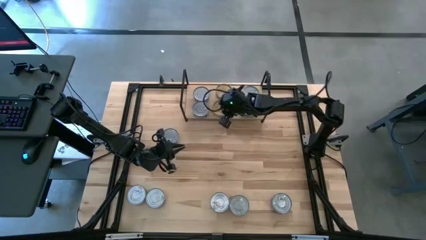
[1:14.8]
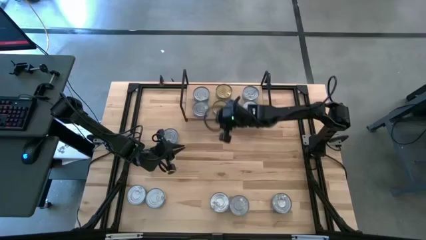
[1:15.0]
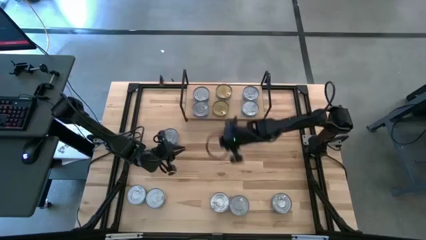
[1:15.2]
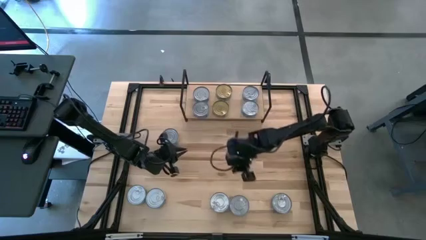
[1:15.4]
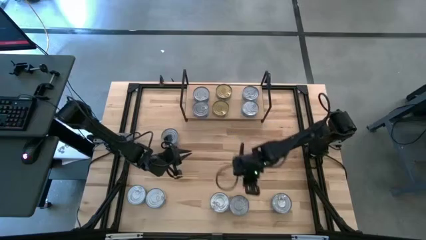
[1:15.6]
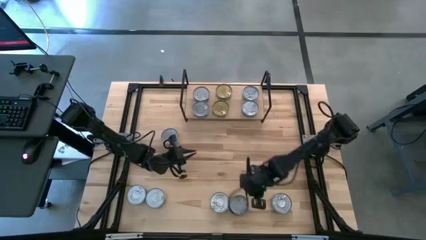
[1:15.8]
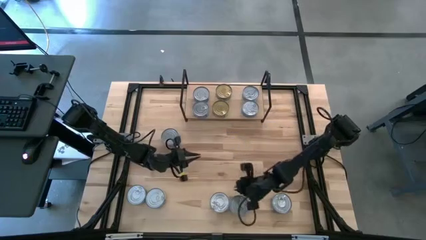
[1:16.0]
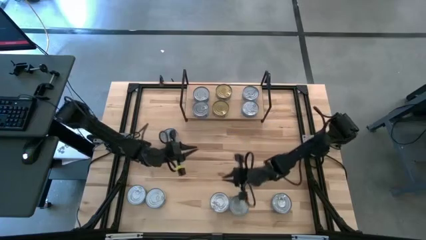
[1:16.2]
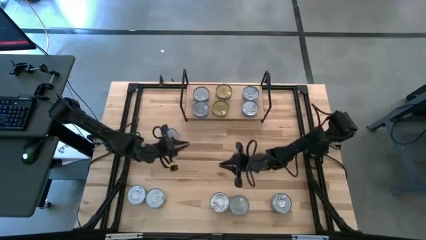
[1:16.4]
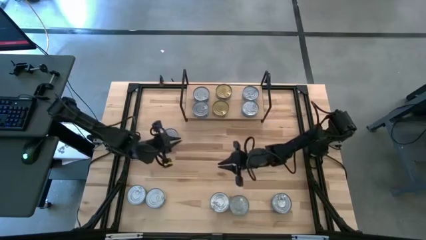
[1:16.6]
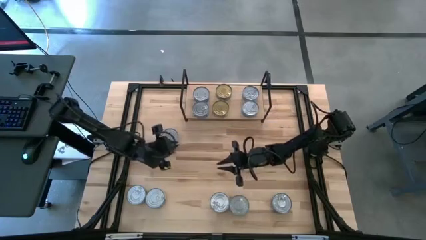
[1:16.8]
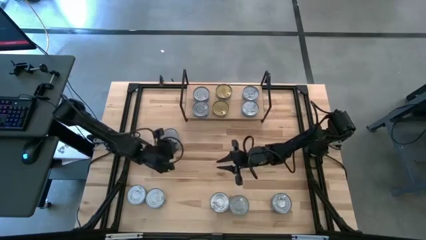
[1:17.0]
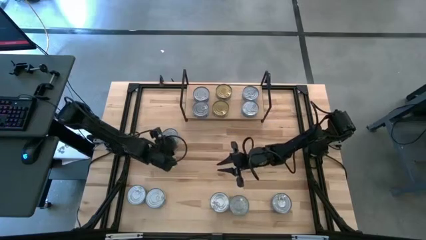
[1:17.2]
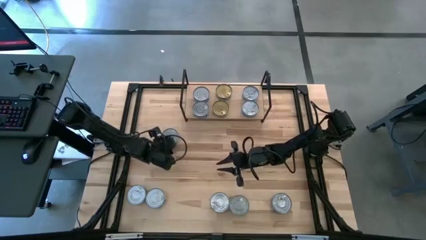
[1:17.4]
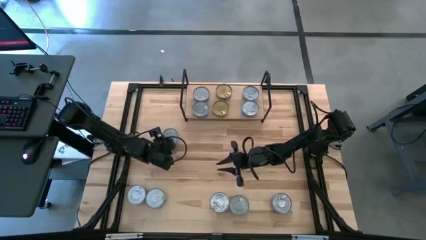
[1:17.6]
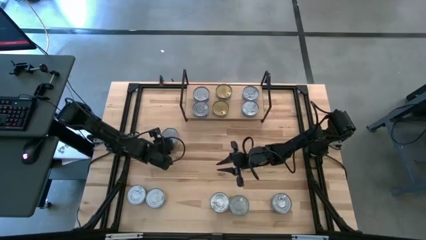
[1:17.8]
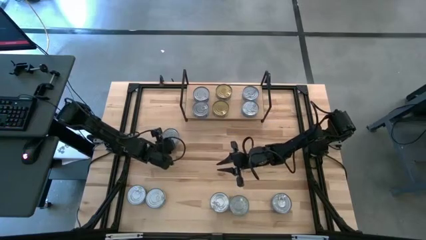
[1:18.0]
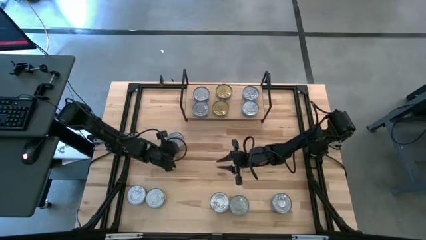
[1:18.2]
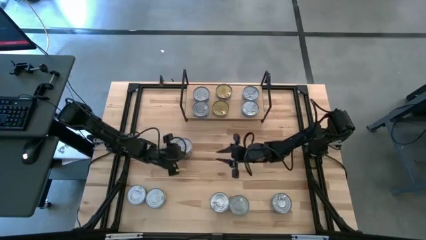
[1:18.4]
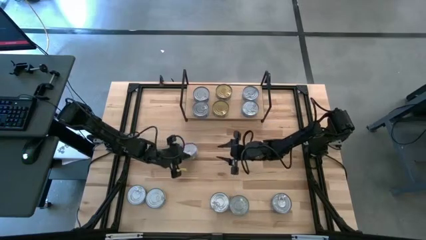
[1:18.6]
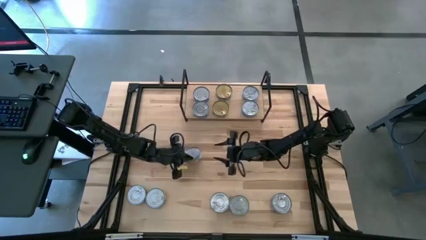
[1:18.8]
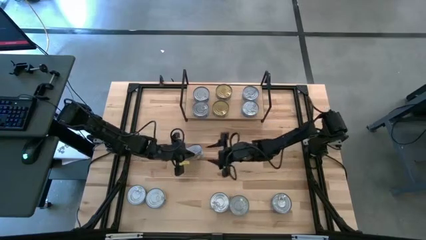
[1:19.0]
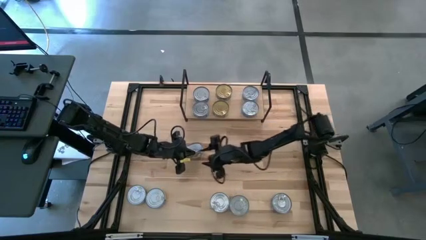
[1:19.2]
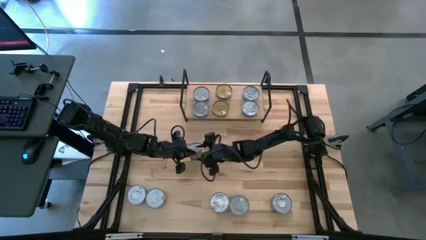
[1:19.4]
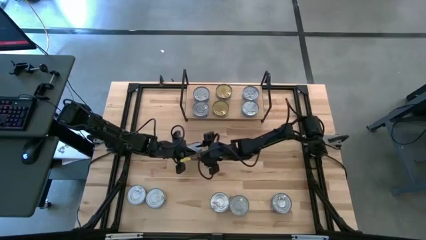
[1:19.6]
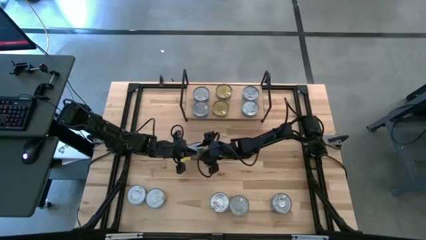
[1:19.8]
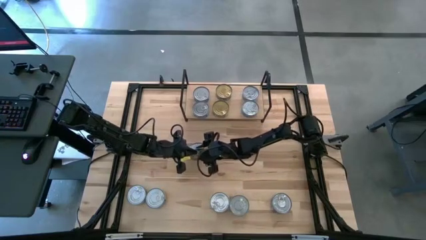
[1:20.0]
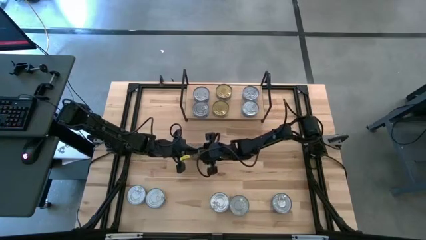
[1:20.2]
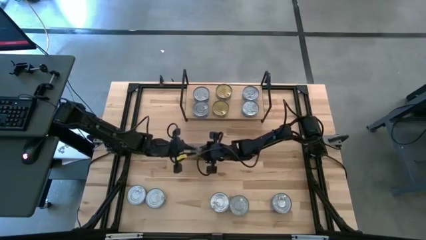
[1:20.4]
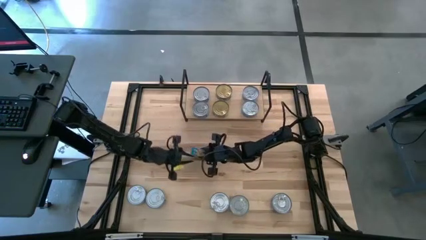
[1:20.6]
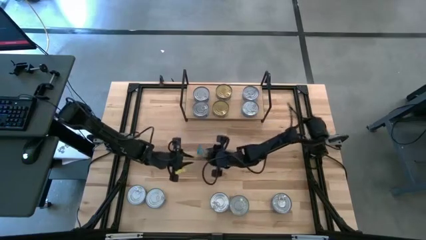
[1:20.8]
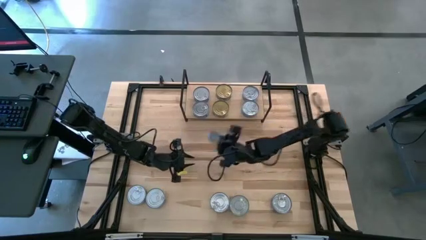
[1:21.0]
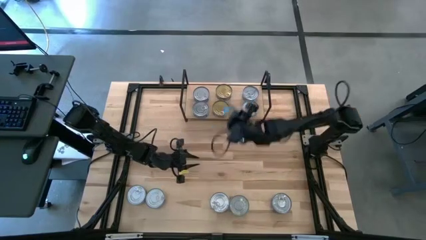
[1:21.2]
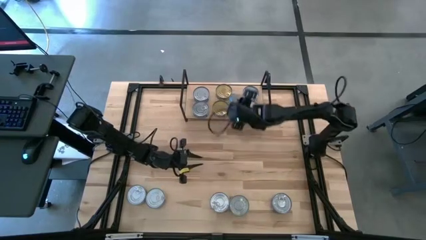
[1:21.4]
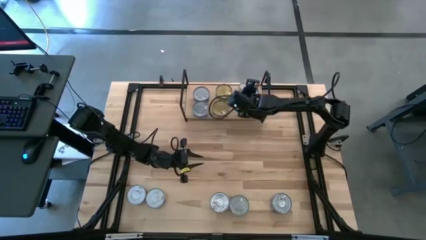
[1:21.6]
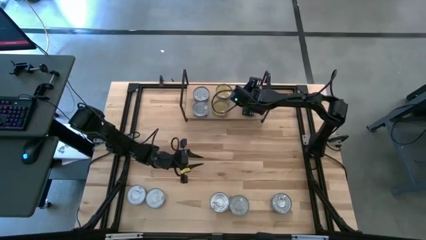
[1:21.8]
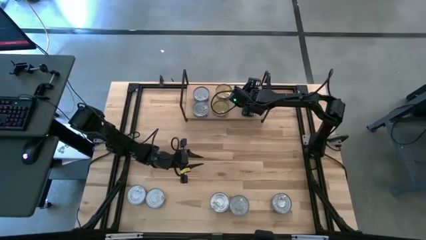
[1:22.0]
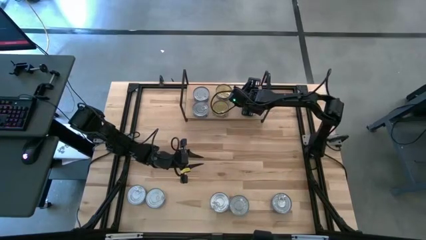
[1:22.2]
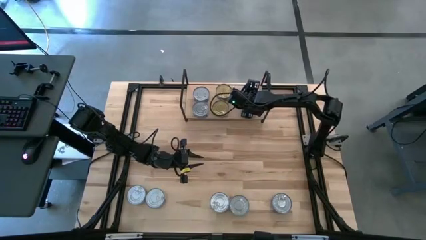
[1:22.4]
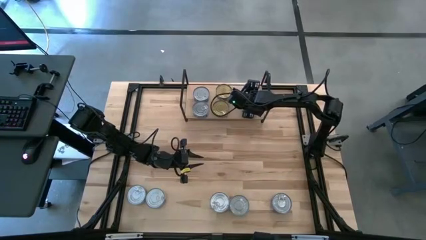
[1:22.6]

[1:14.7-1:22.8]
Task: Stack canned seafood by type on shelf
Stack the top yellow-blue tuna can on top of the top yellow-blue tuna can on the shelf

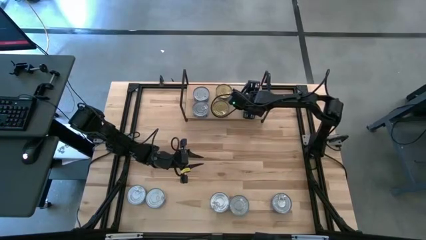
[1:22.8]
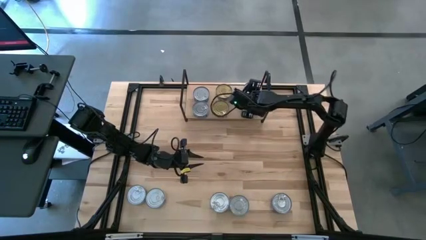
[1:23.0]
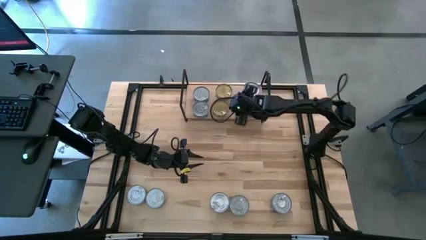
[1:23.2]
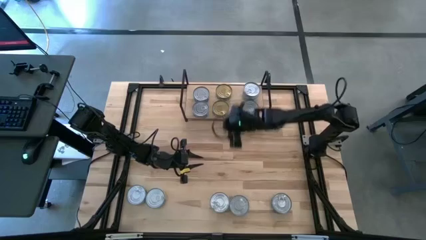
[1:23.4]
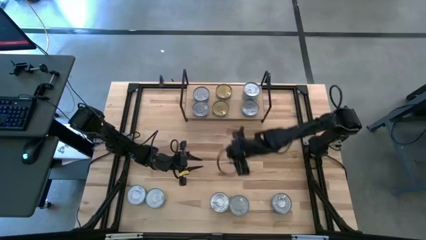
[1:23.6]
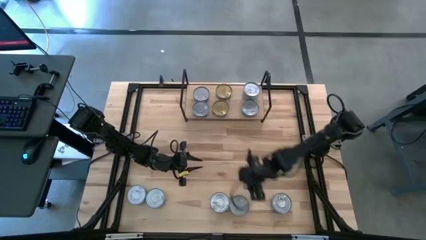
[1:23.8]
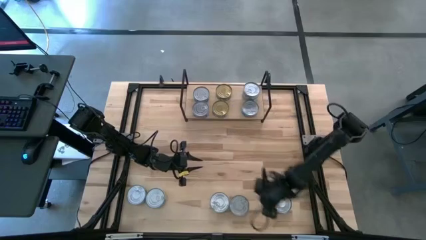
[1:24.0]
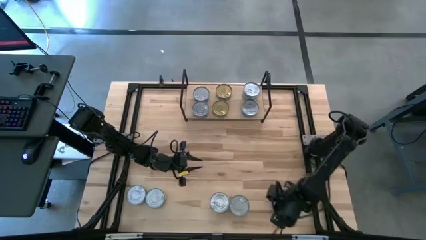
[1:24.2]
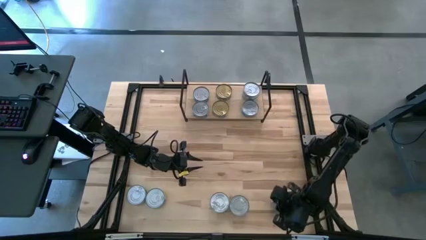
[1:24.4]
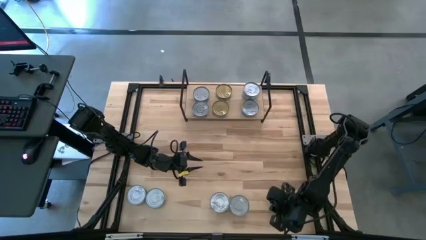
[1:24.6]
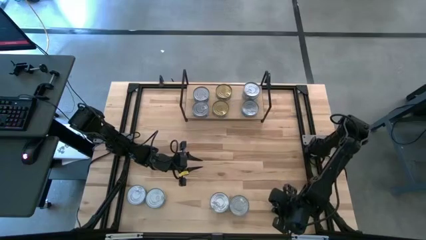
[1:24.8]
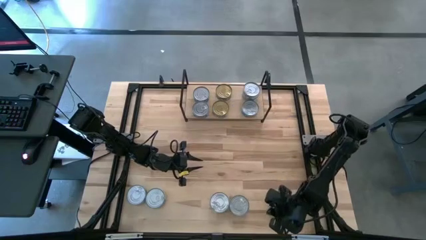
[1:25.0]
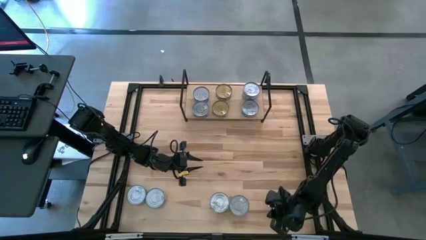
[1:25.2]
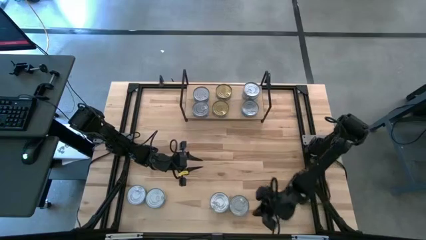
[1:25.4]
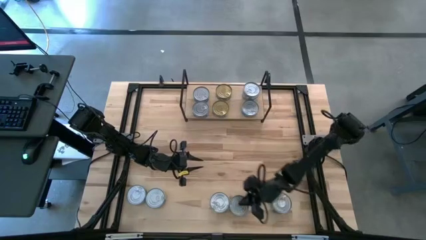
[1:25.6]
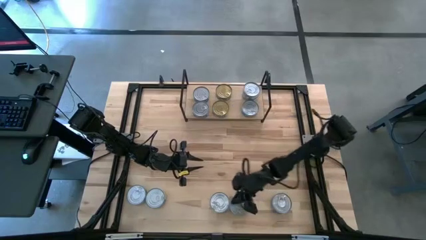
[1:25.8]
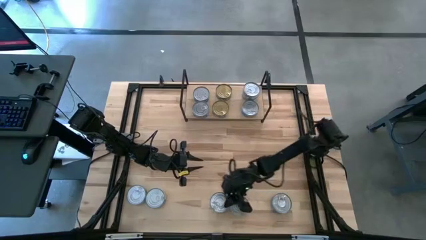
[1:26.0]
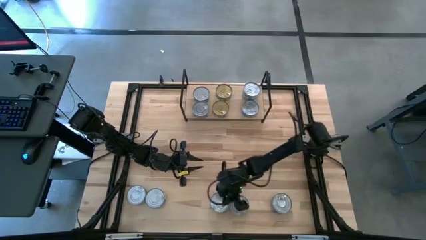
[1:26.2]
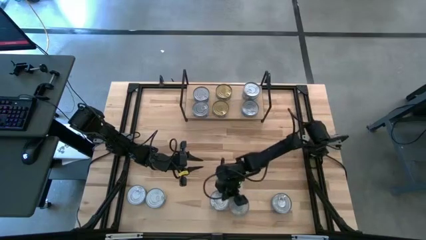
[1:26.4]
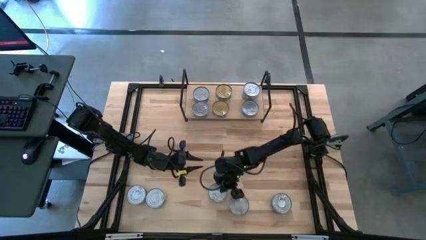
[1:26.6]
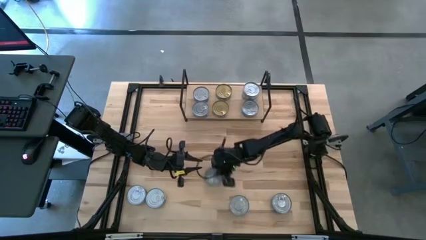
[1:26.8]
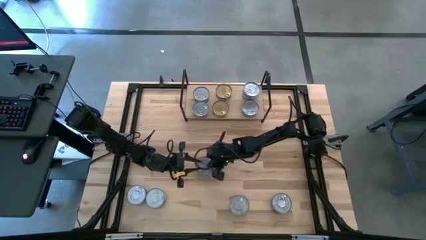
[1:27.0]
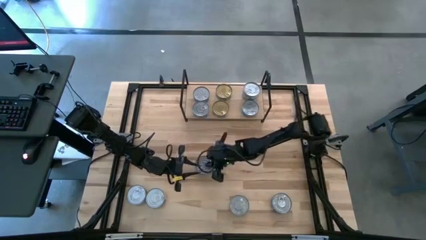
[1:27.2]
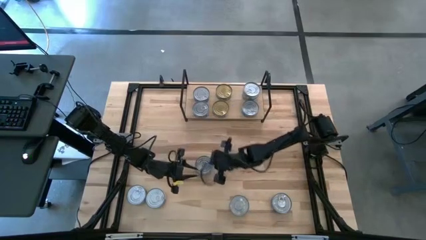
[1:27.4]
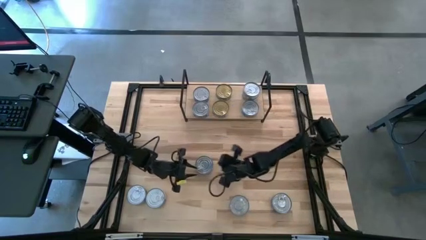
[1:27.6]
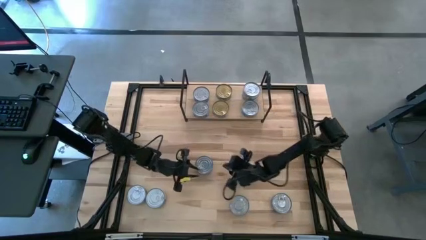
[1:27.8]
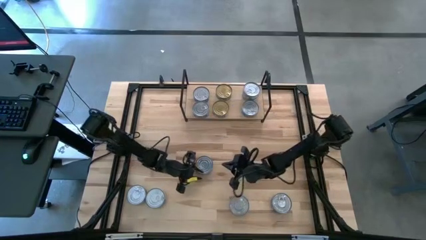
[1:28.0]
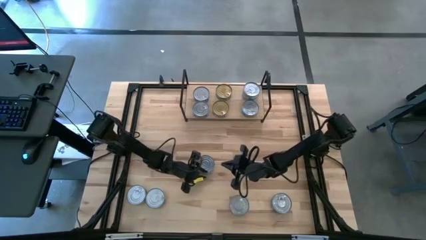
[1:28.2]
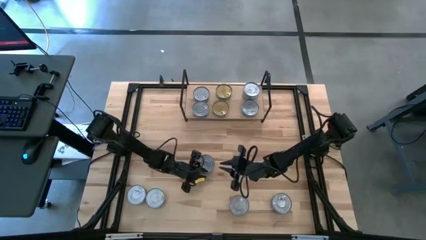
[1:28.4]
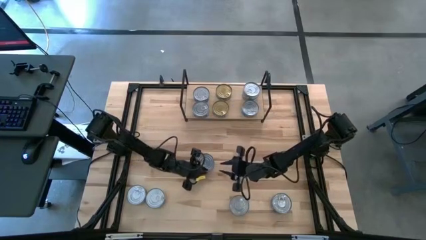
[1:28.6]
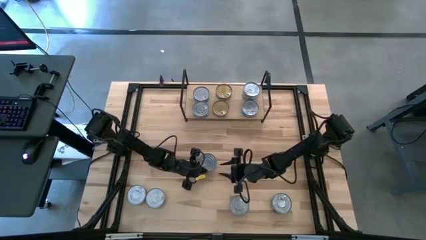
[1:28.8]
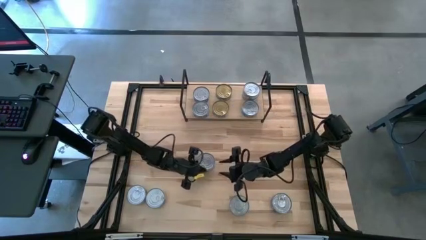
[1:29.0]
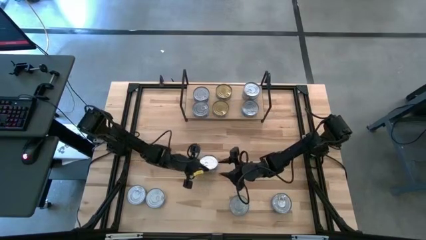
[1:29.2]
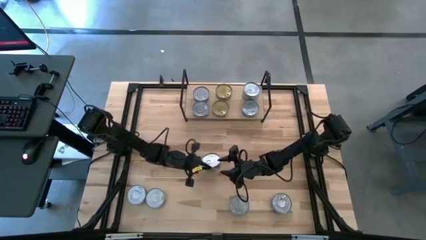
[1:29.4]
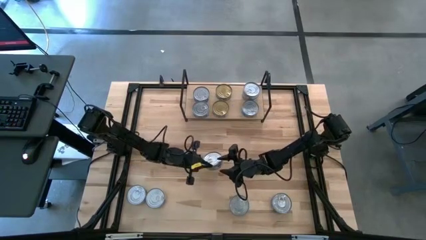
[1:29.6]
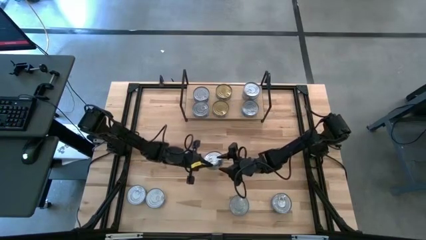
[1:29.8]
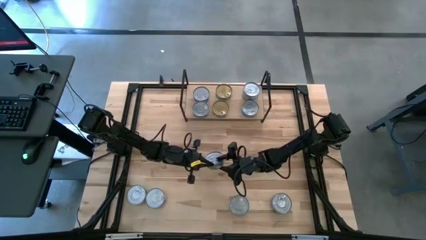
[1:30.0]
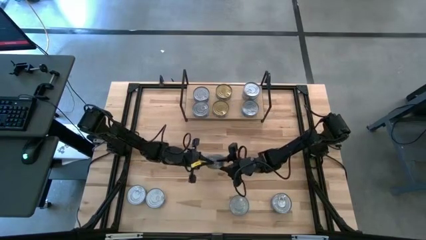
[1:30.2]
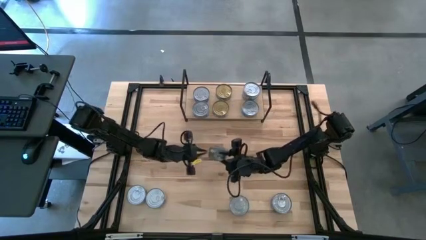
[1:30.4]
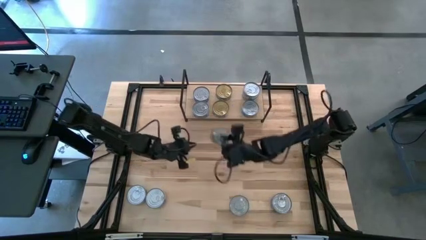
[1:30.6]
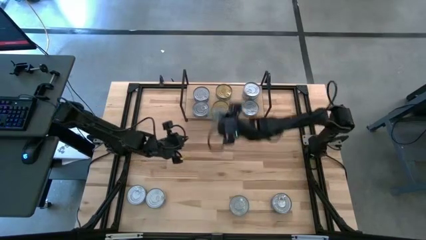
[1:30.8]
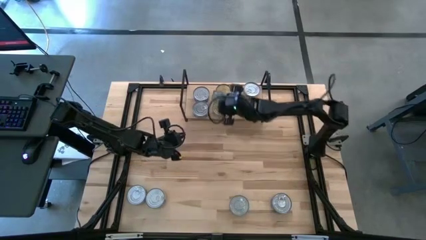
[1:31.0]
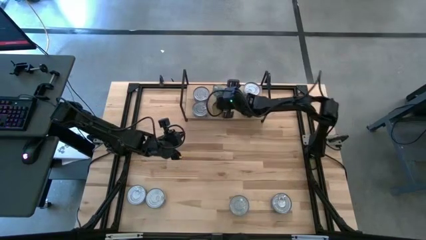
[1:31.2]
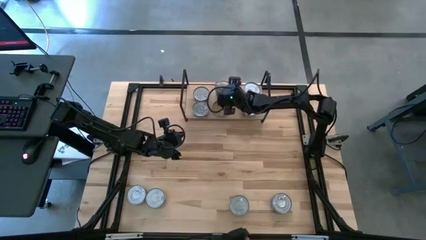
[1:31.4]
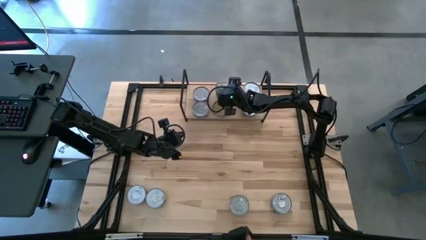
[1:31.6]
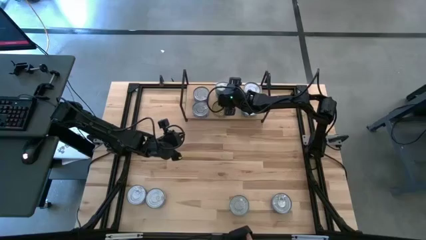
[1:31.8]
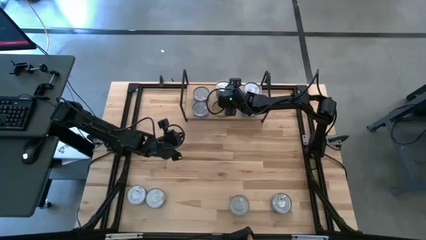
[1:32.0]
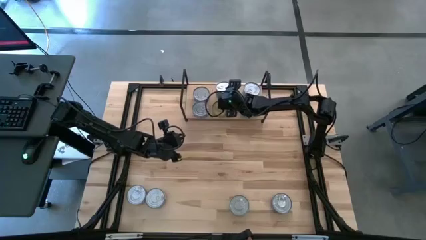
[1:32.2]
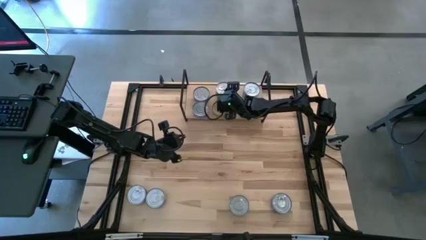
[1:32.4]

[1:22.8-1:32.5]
Stack the right green tuna can on top of the top green tuna can on the shelf
